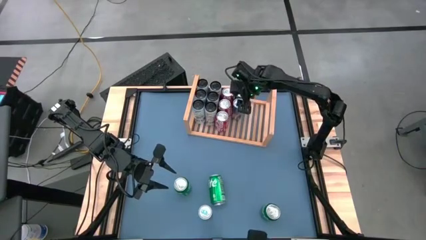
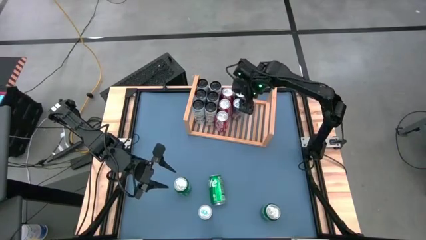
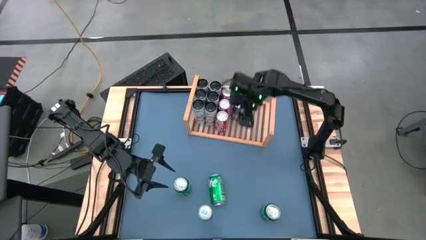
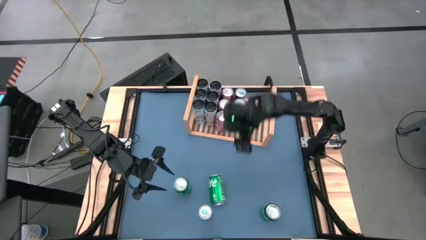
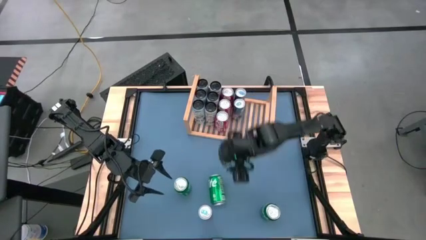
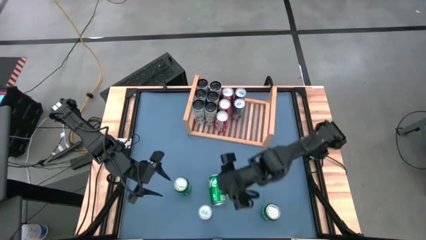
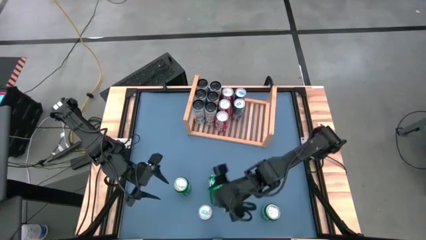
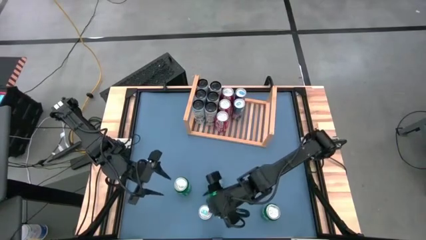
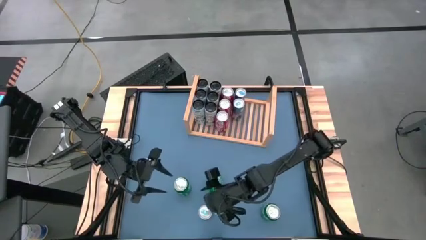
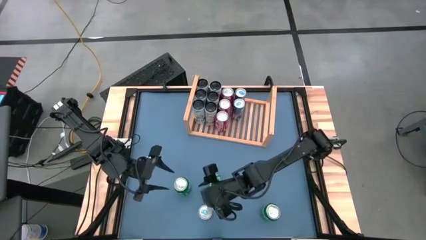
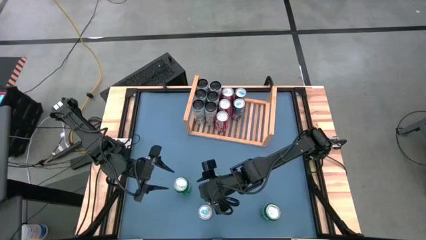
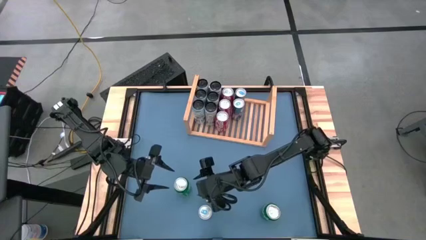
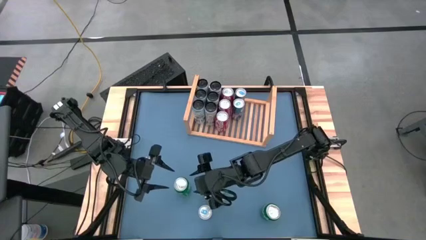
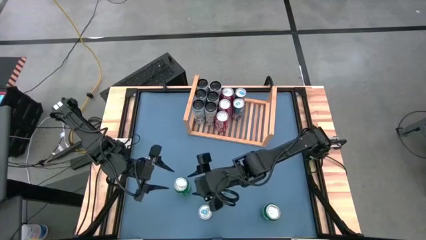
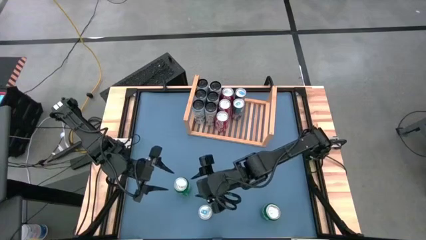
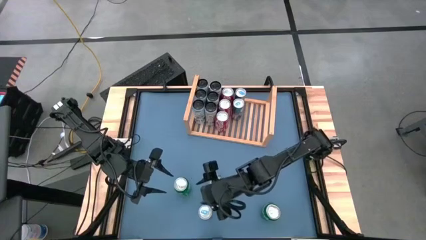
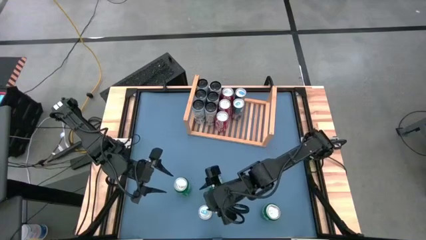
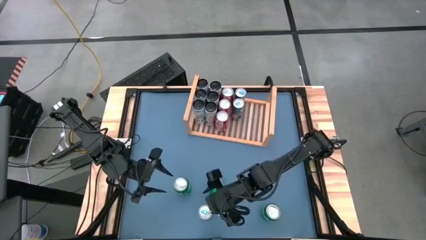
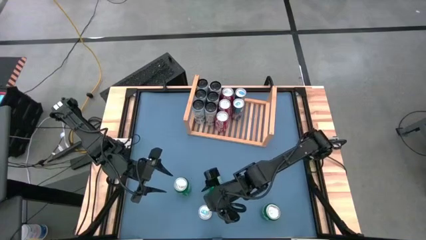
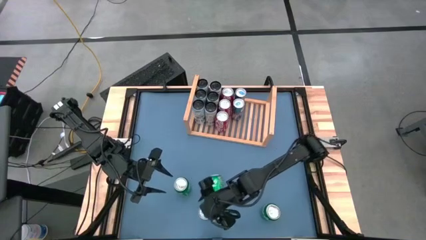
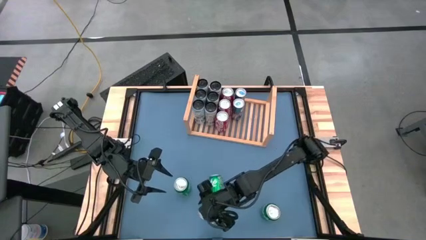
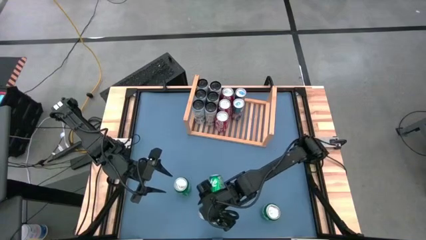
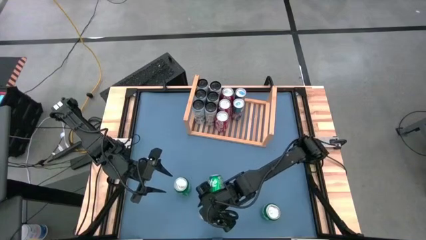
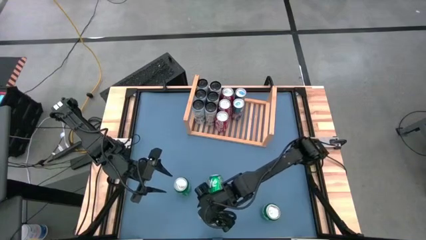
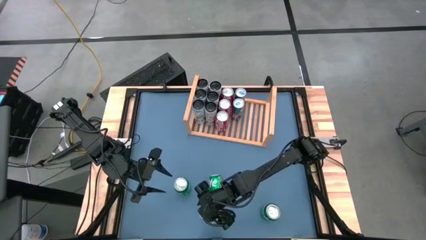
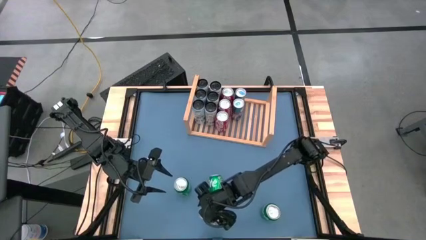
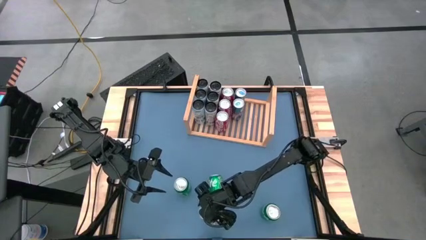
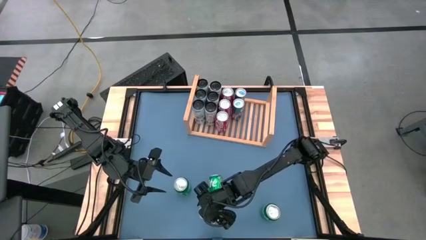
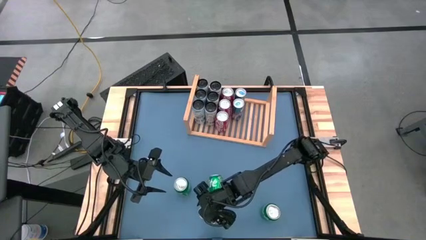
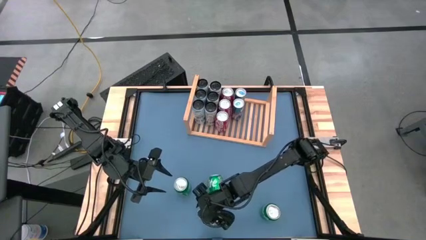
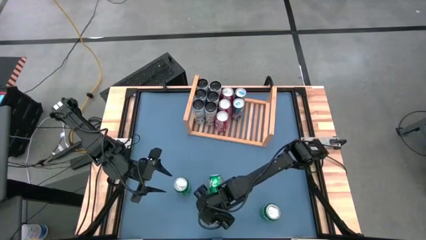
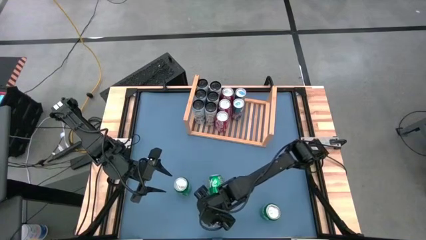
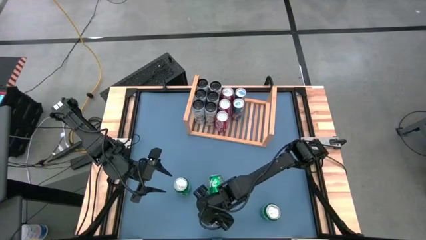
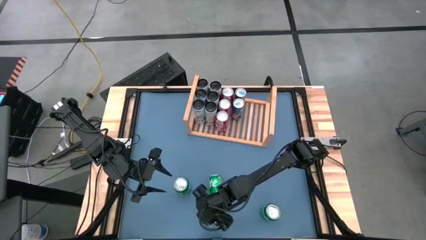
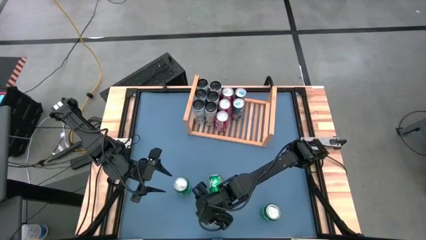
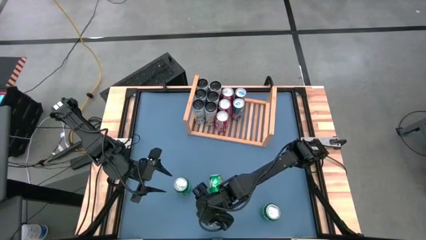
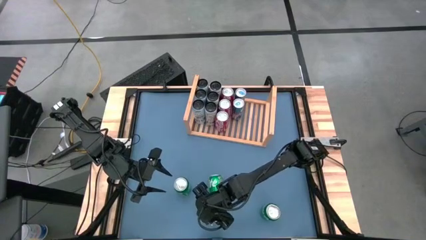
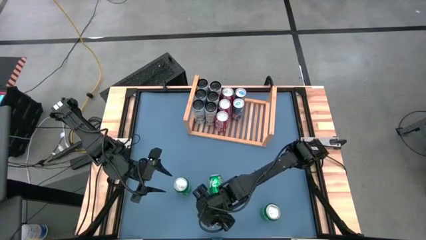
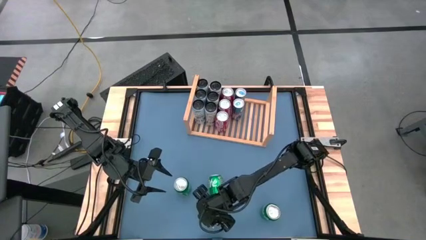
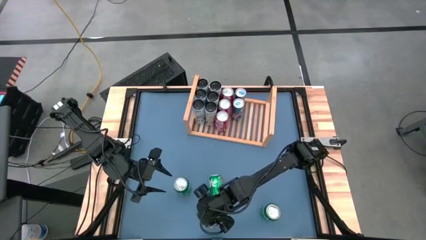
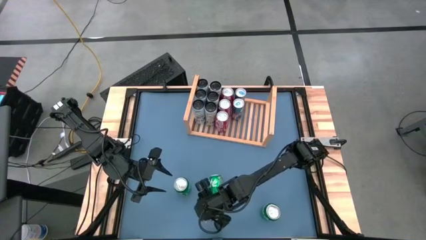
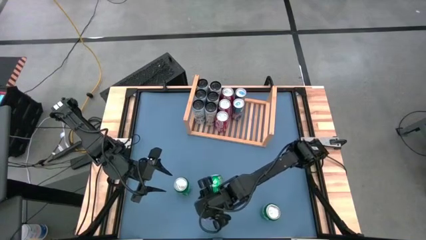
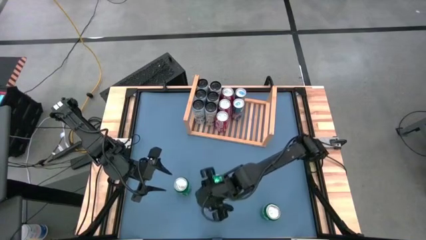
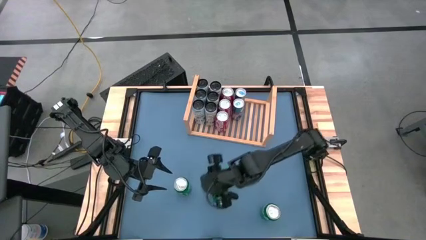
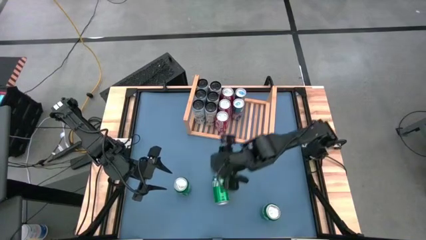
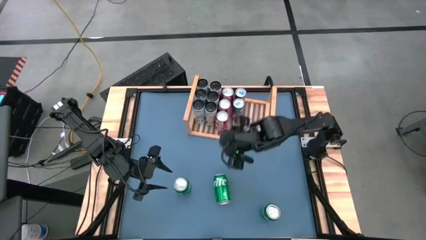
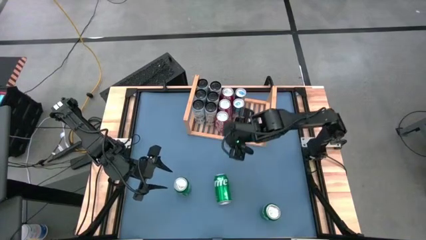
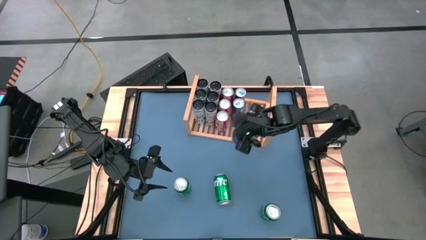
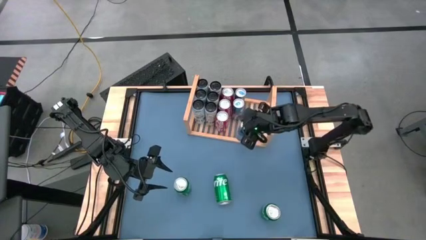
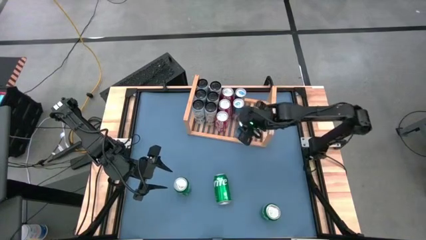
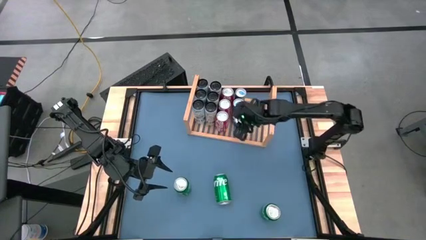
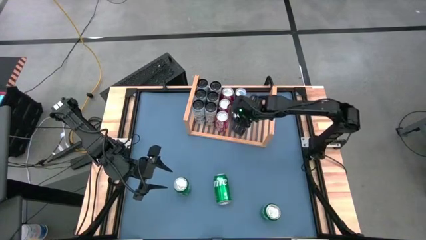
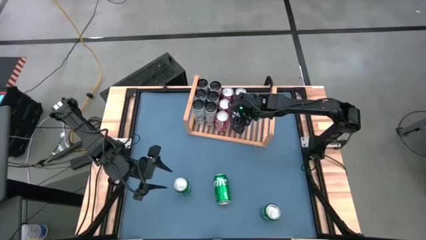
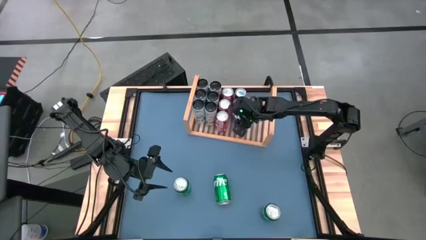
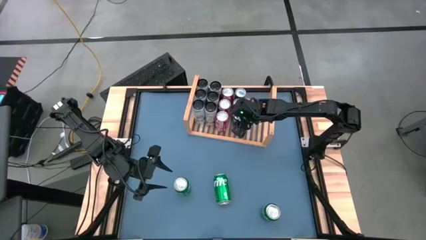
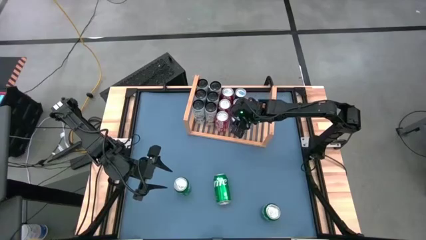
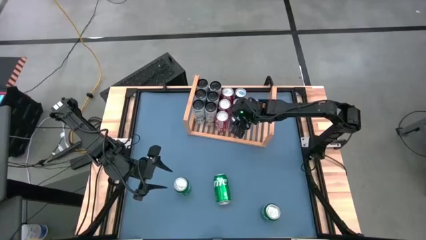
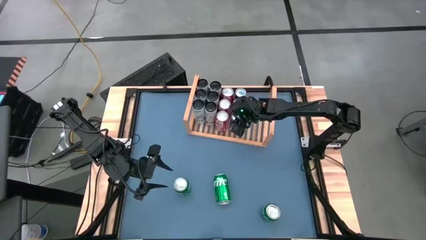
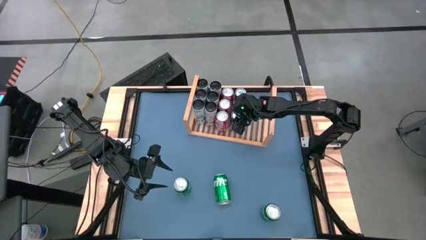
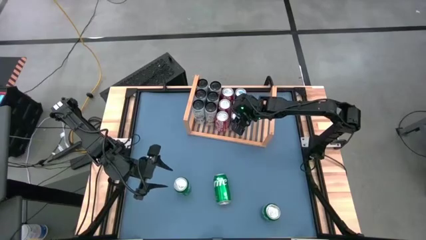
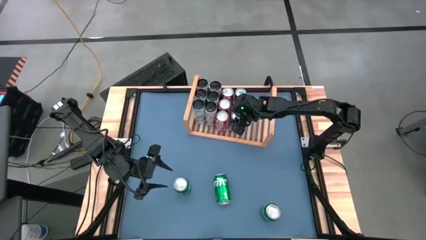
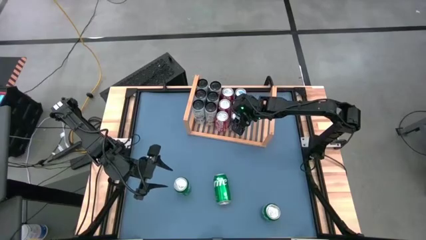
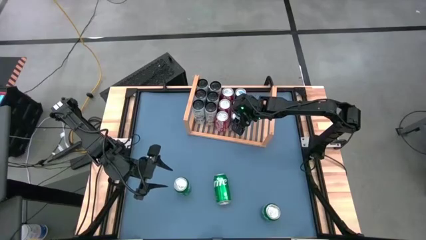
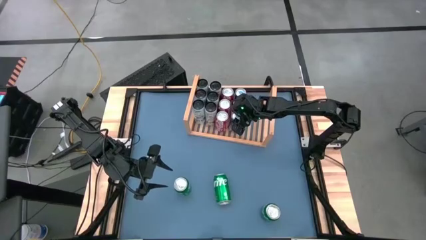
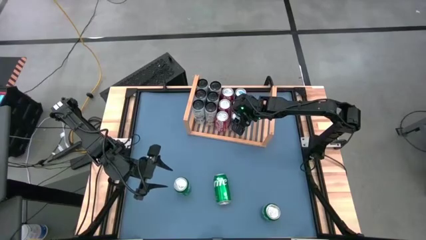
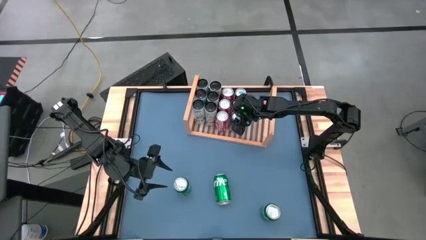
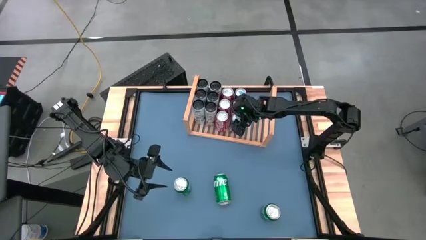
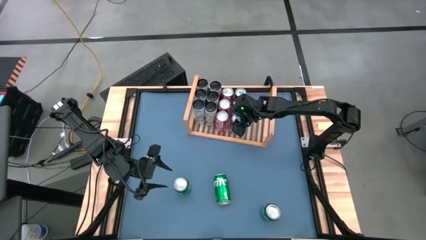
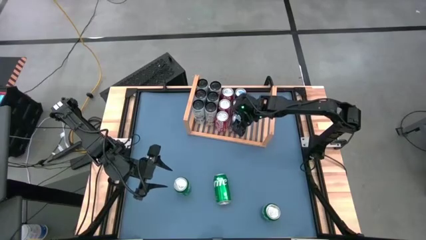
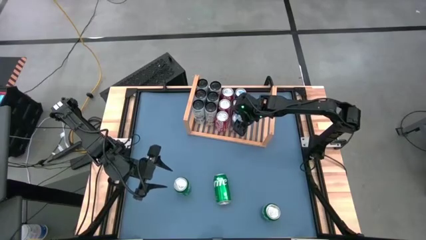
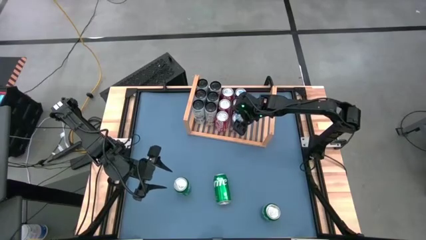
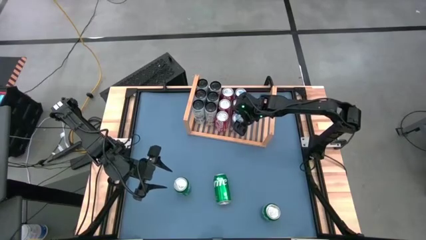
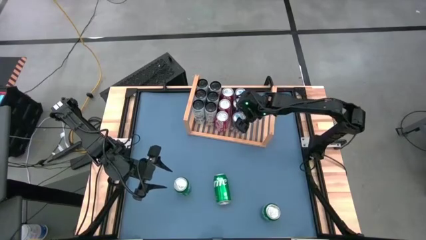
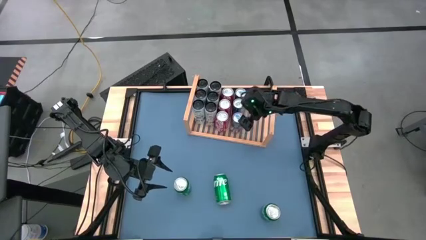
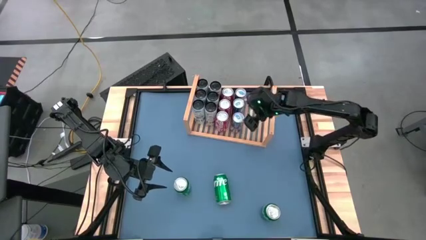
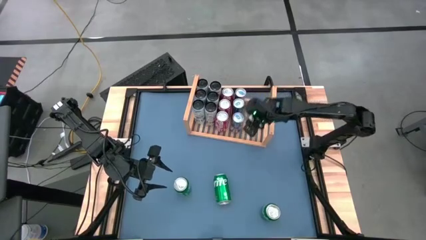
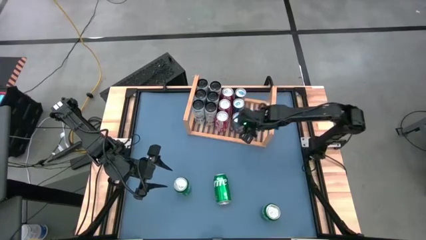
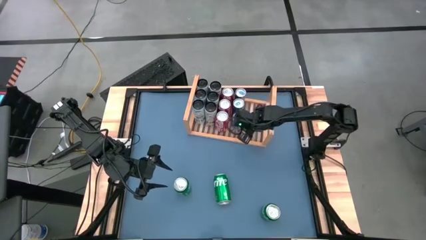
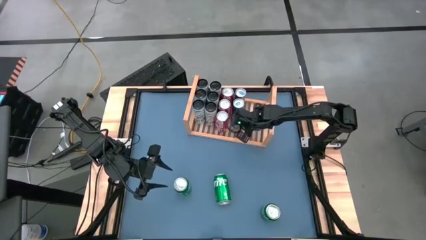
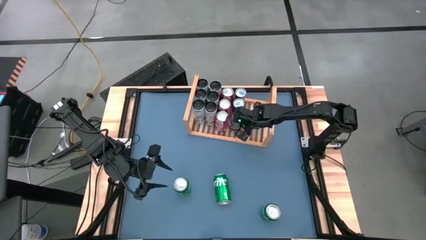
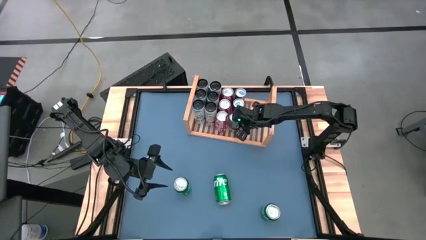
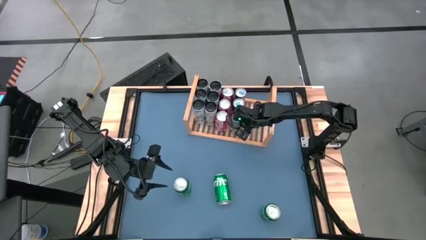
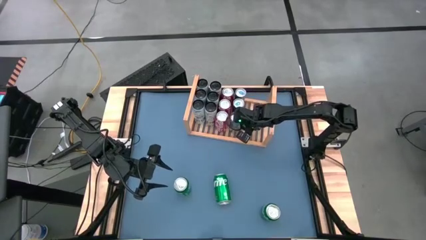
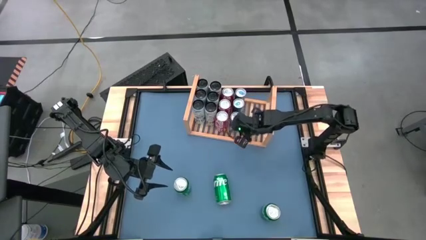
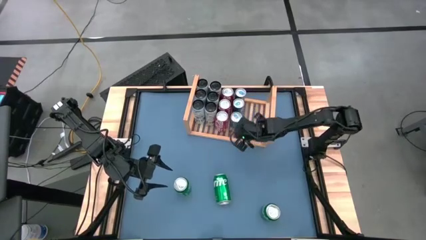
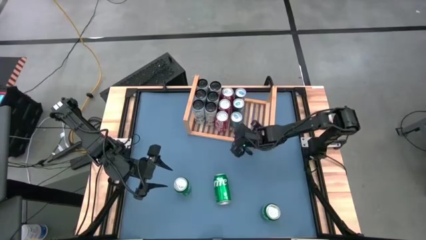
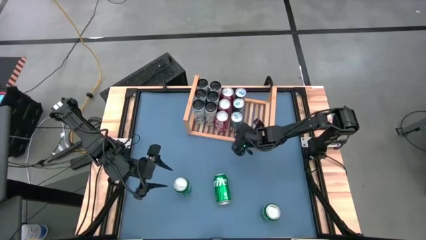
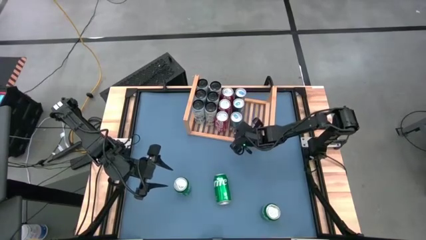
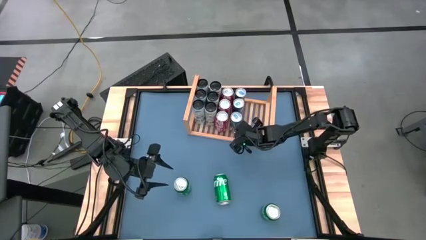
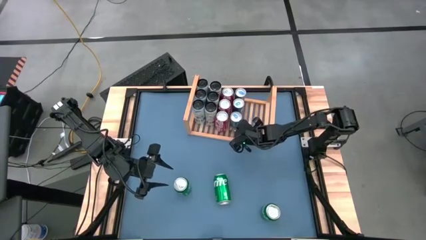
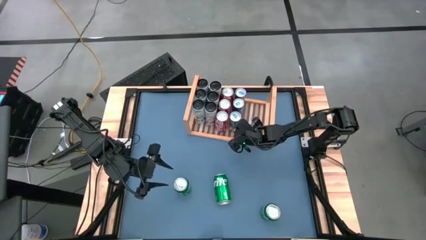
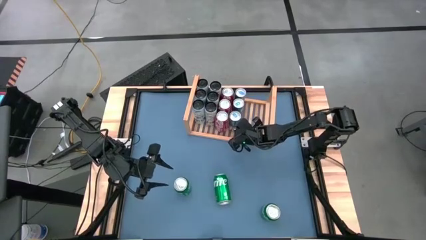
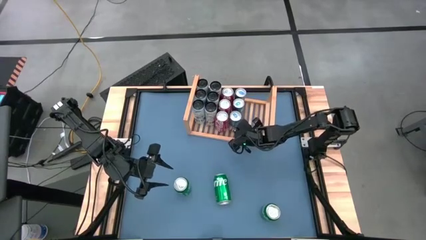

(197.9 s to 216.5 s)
Task: Place canned beverage on shelf
Put the blue soda can on the shelf aligned with the other blue soda can
